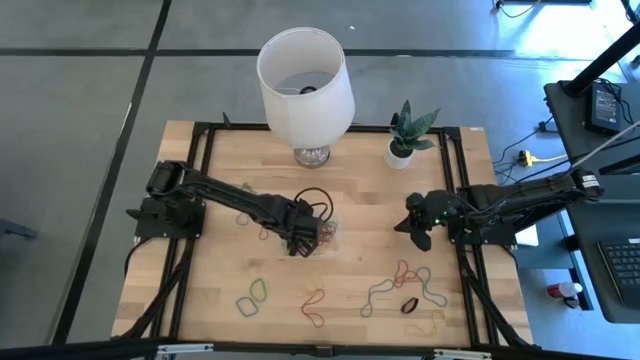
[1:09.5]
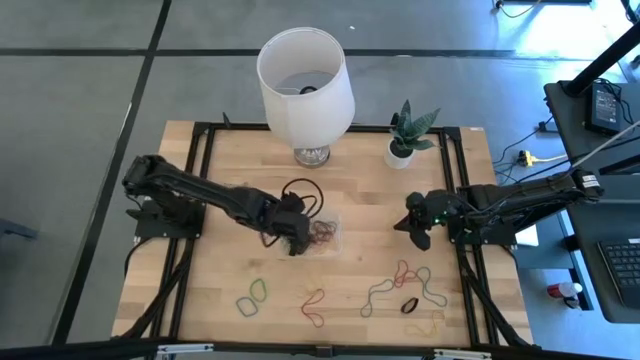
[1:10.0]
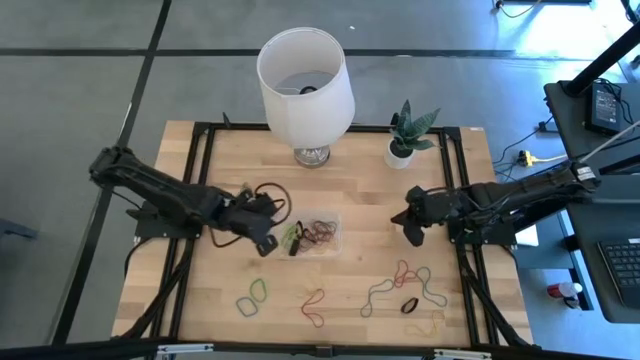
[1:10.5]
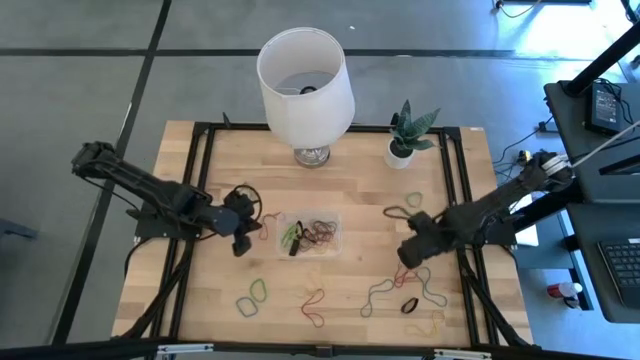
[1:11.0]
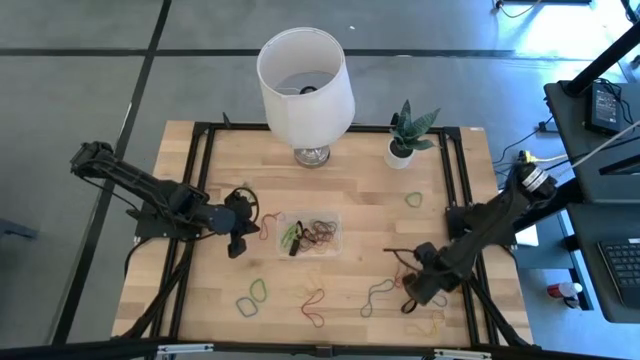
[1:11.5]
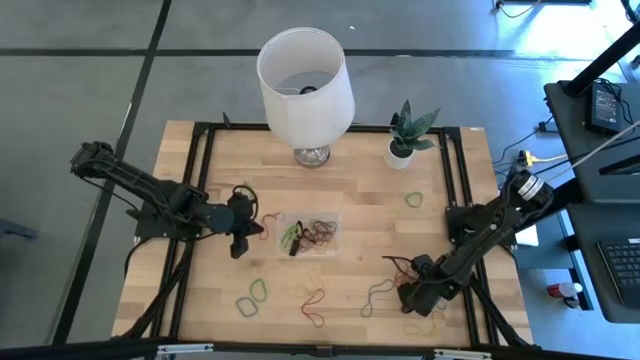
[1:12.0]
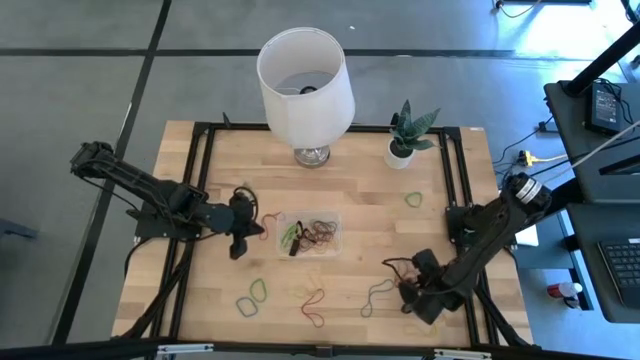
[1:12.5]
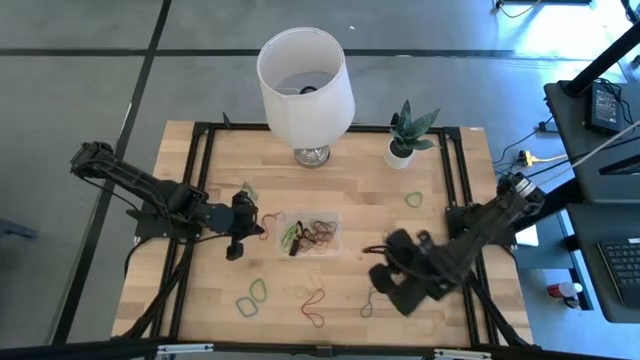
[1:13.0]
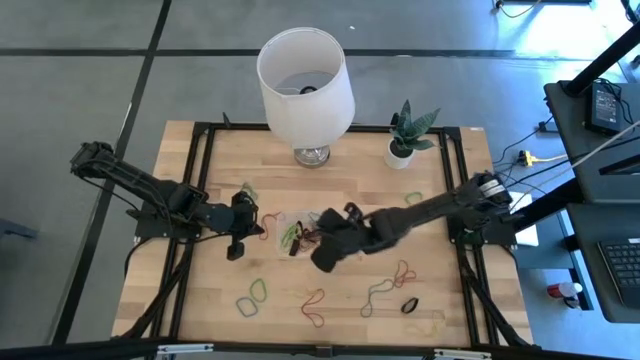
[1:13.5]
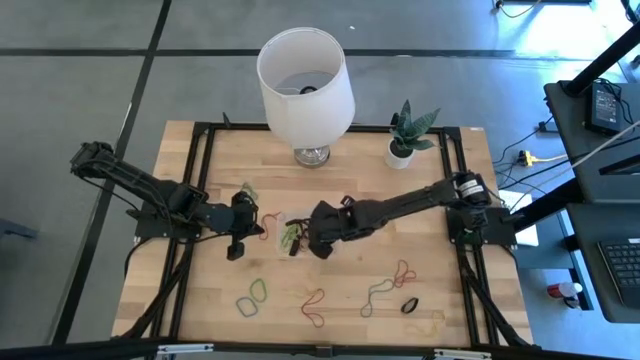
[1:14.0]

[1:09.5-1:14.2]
Task: Pick and place rubber bands into bin
Put the blue rubber band into the transparent bin

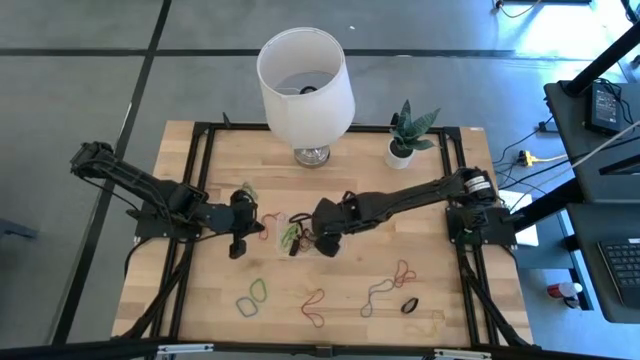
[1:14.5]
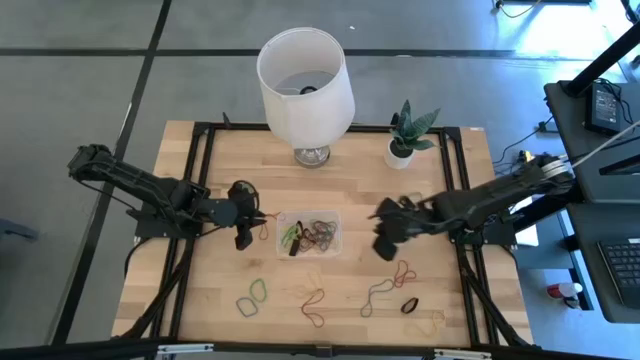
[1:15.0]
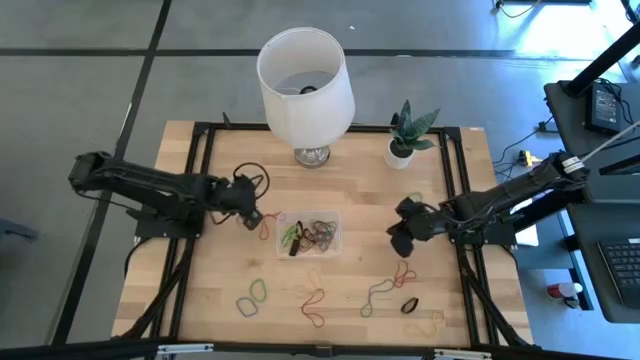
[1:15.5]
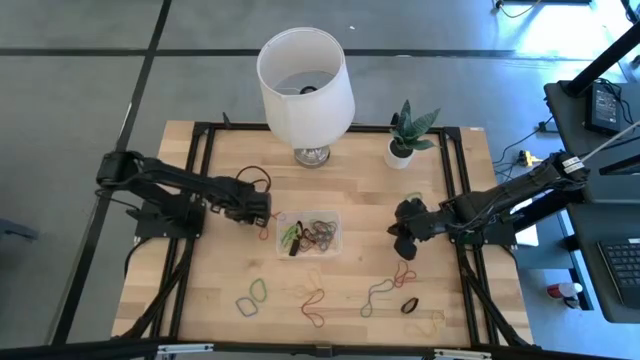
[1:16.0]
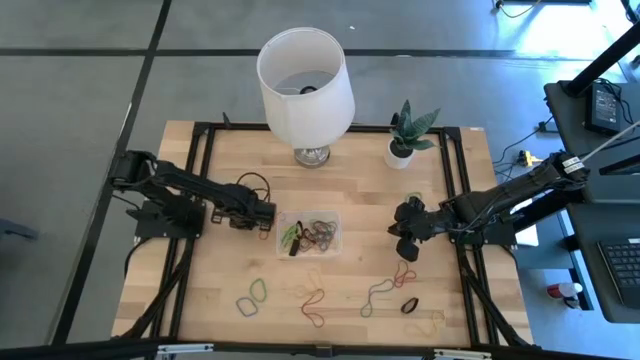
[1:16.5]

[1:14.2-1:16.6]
Put the top left blue rubber band into the transparent bin

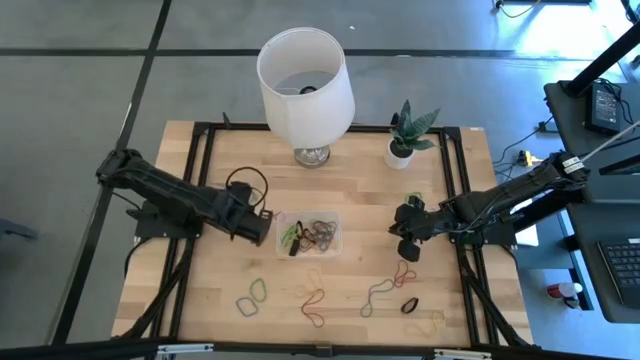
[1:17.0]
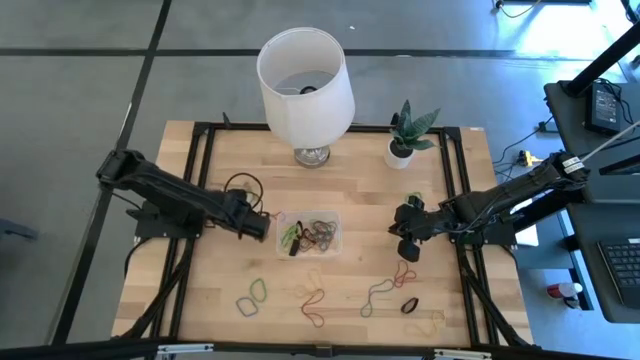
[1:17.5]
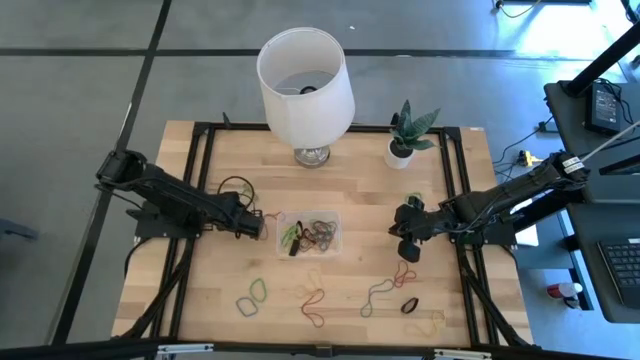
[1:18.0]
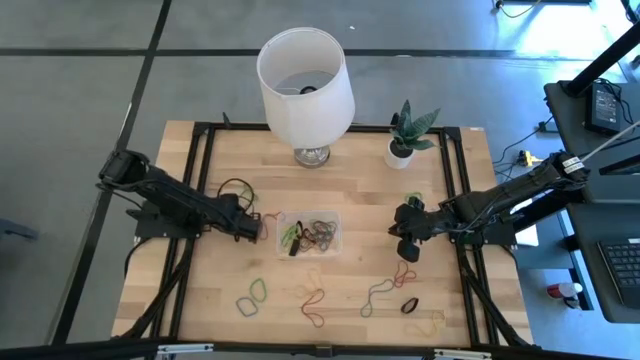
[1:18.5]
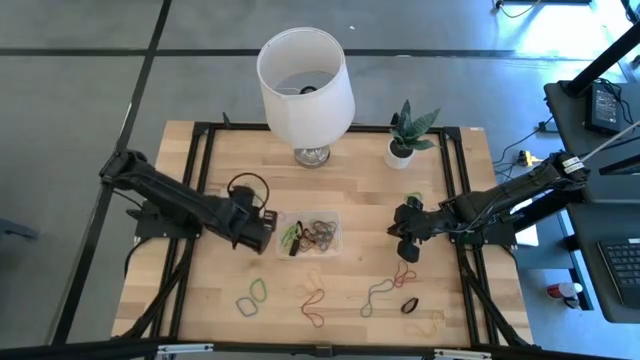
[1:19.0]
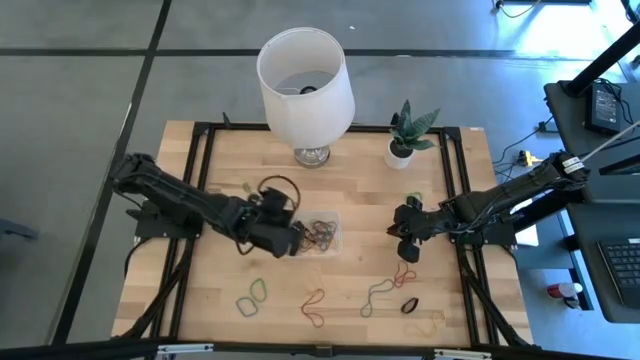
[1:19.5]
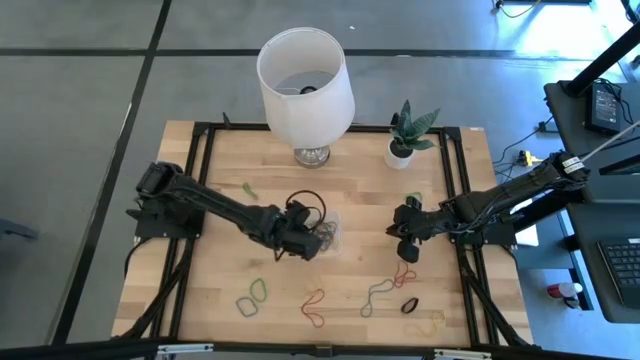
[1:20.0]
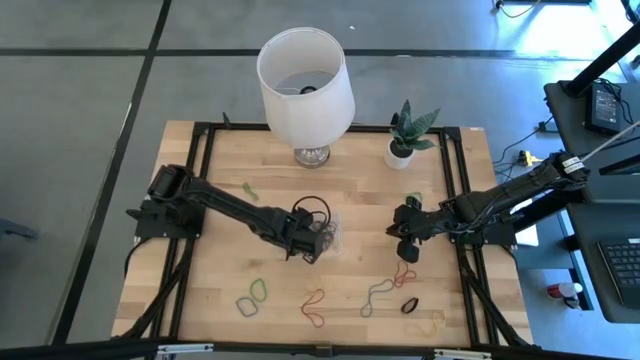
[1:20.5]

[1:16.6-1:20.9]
Put the top left blue rubber band into the transparent bin

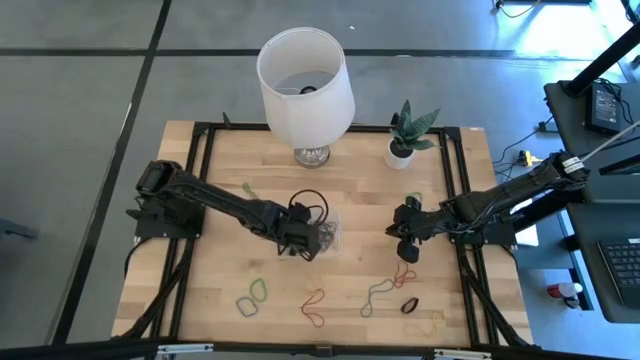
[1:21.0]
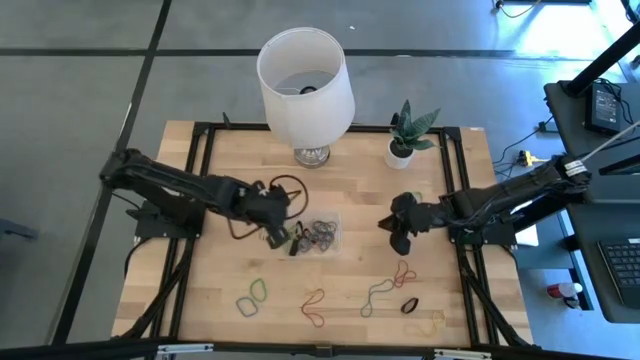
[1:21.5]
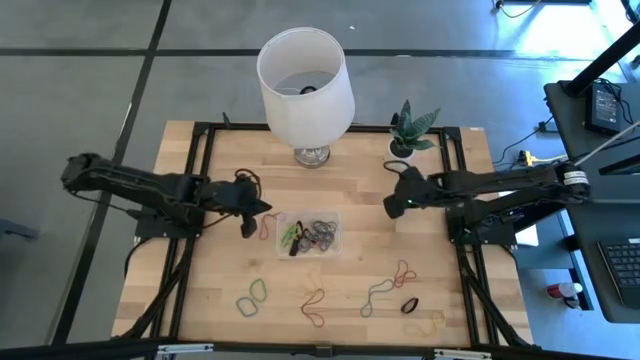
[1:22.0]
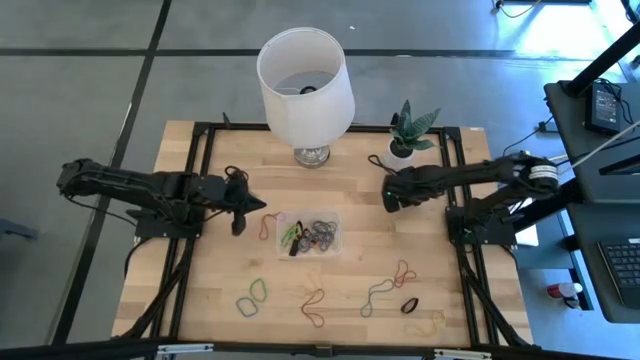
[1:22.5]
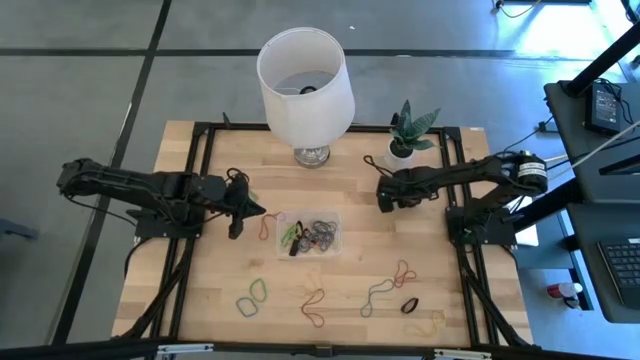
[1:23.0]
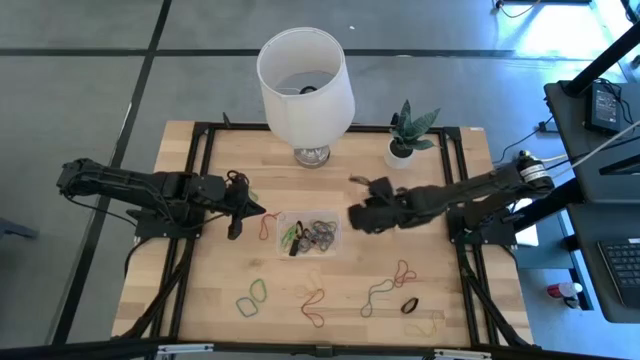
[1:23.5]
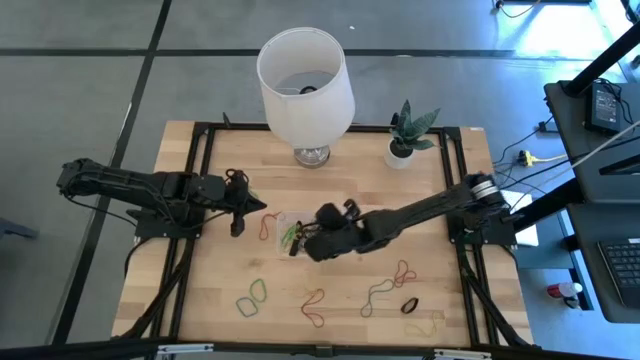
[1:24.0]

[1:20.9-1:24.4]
Put the top right green rubber band into the transparent bin

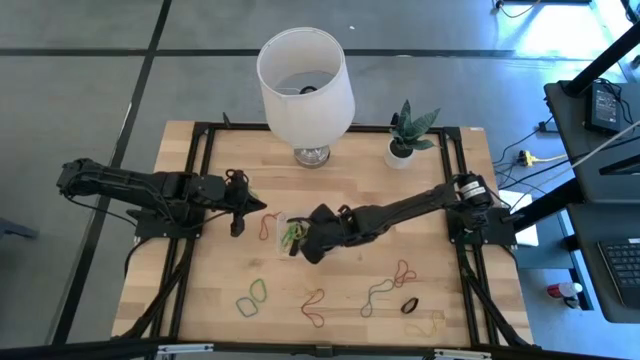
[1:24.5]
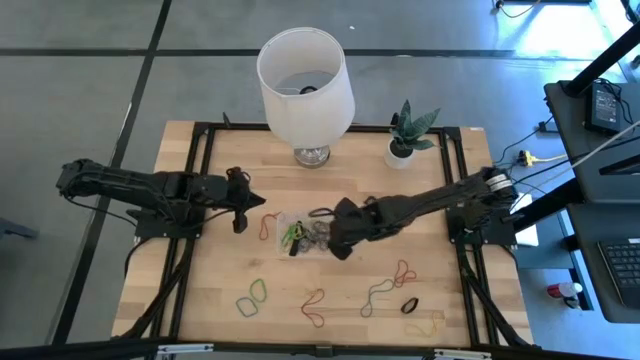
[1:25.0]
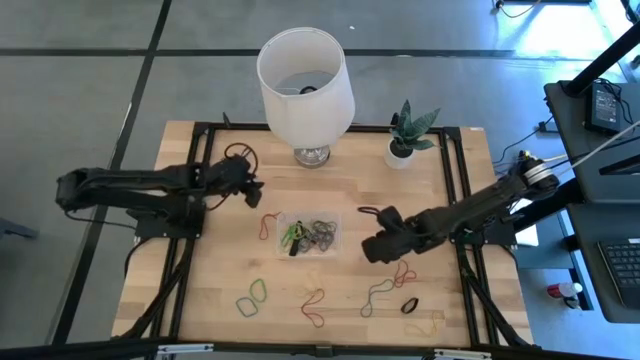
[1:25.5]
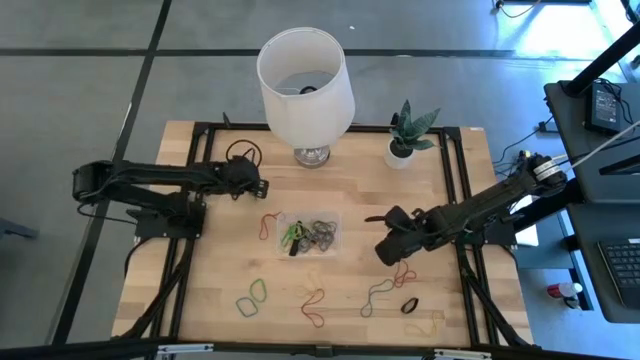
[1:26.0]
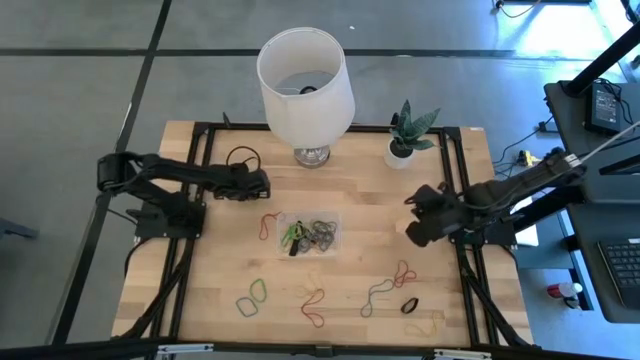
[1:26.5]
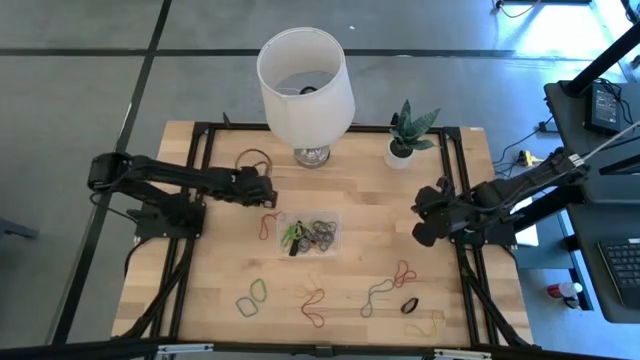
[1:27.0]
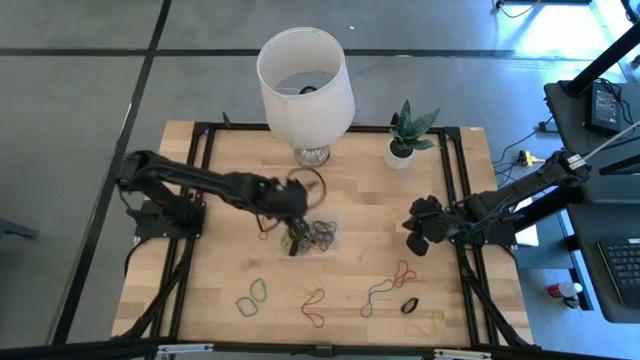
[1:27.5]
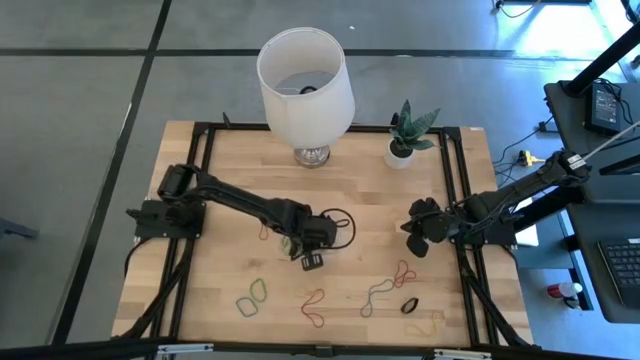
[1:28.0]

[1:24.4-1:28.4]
Put the top left green rubber band into the transparent bin

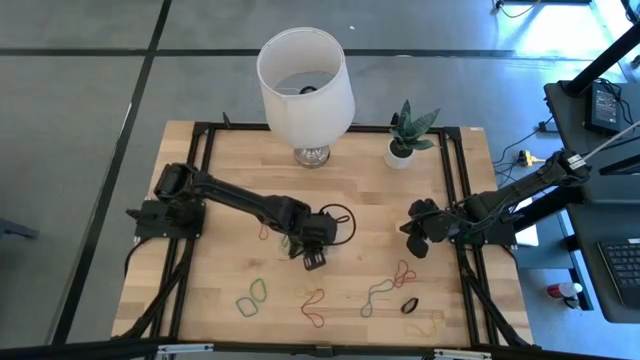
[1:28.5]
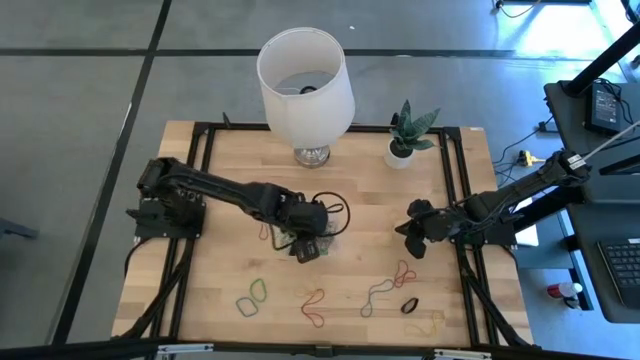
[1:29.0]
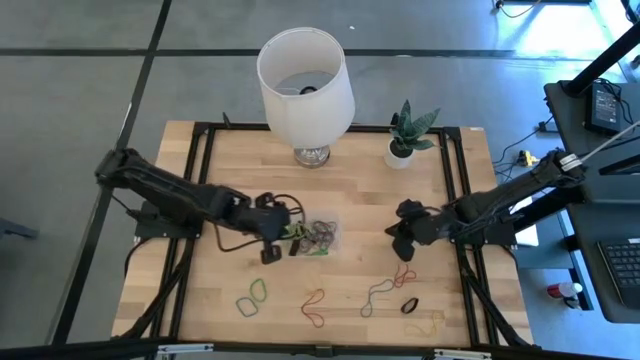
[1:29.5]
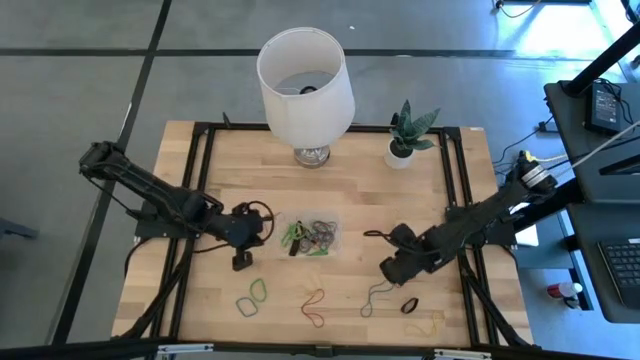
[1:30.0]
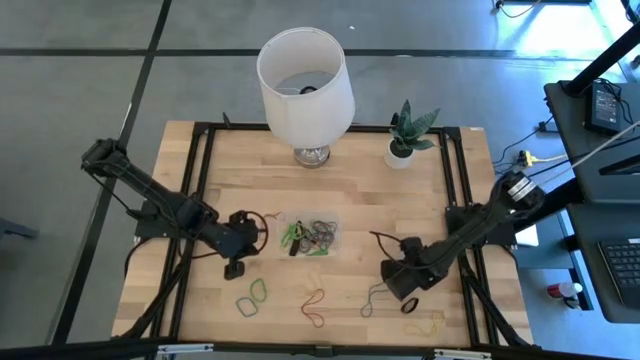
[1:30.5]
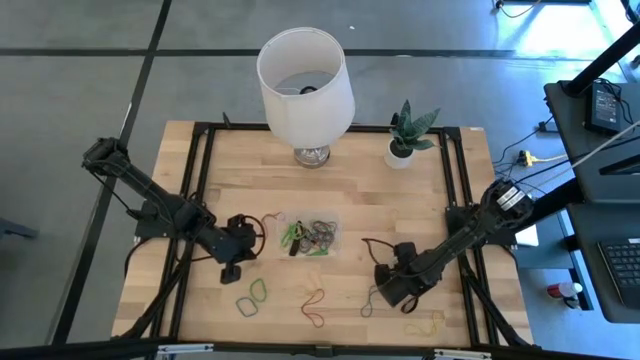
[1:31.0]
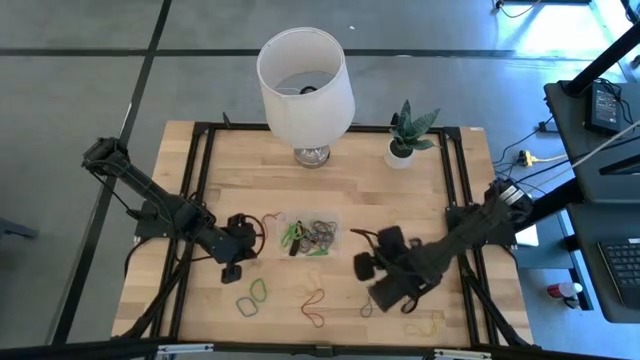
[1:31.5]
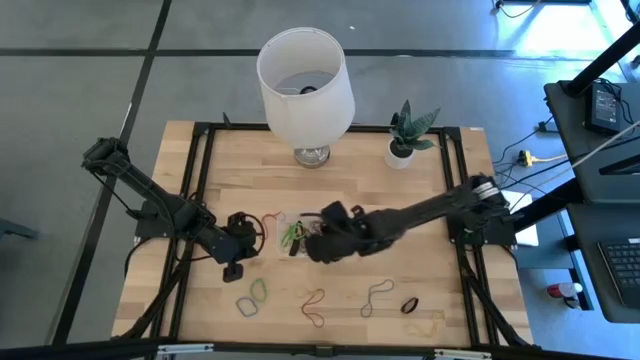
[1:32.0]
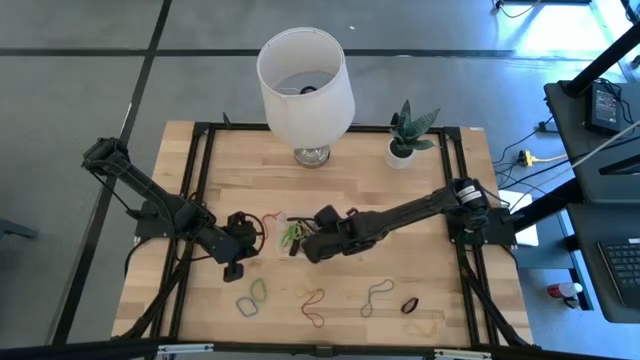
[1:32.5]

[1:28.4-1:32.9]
Put the bottom right red rubber band into the transparent bin
